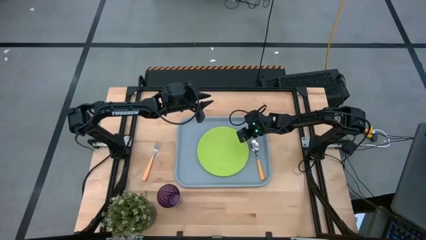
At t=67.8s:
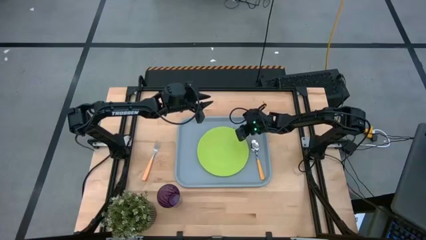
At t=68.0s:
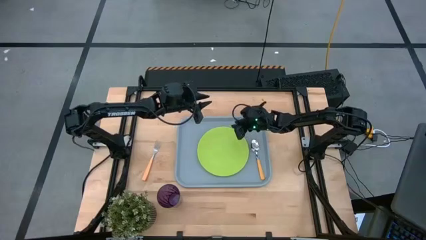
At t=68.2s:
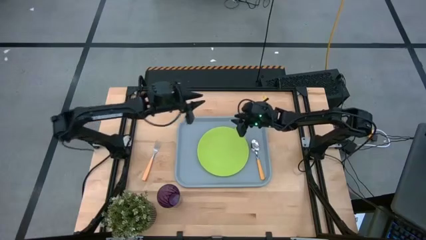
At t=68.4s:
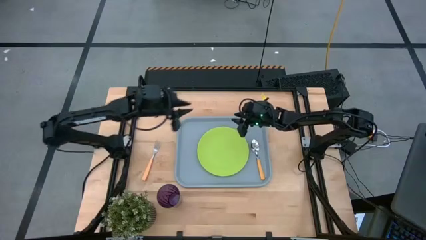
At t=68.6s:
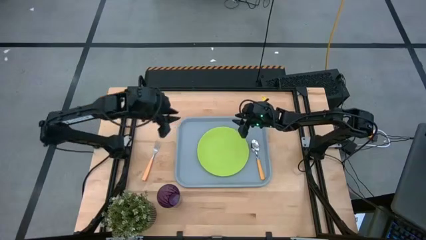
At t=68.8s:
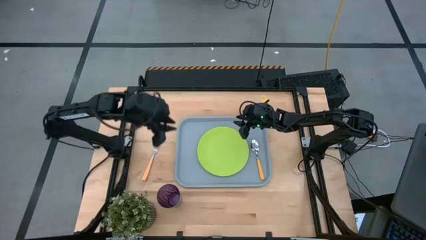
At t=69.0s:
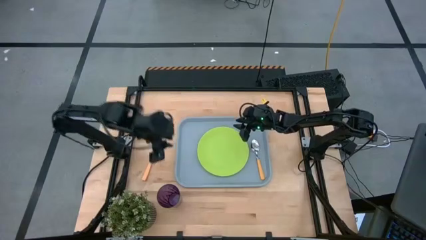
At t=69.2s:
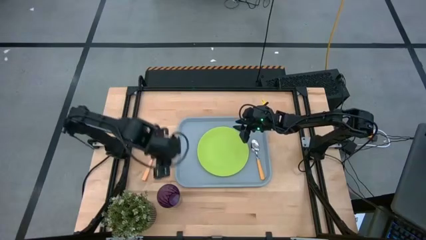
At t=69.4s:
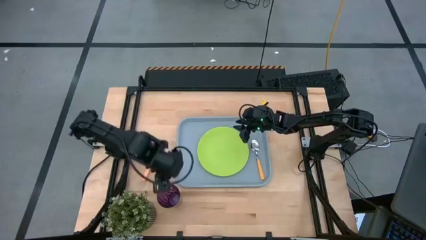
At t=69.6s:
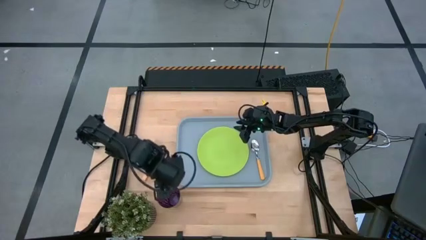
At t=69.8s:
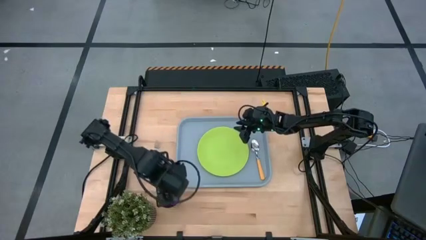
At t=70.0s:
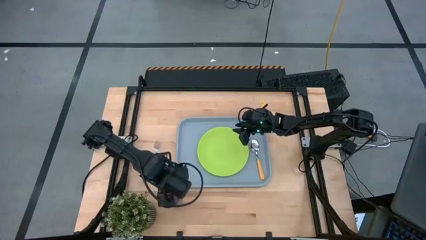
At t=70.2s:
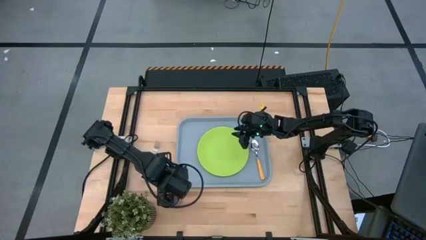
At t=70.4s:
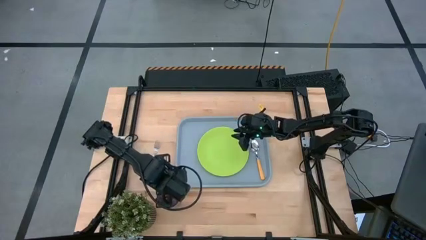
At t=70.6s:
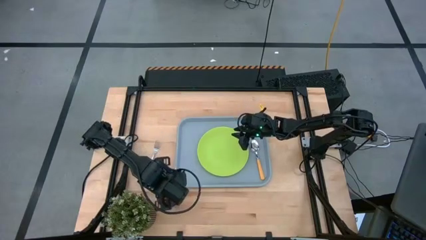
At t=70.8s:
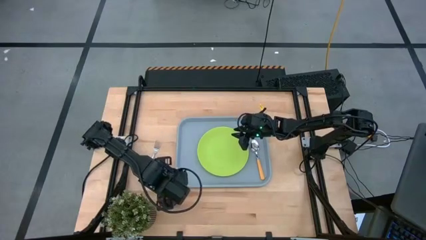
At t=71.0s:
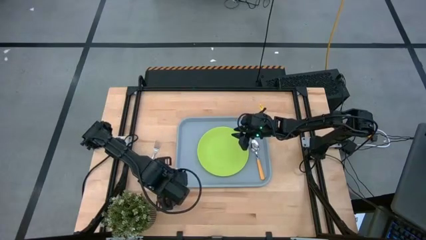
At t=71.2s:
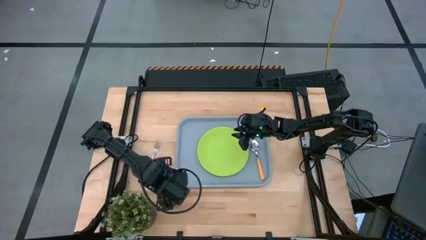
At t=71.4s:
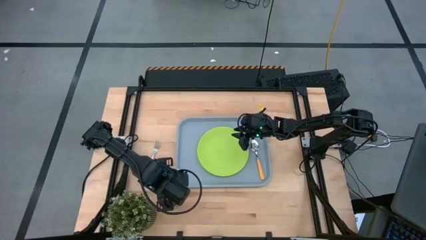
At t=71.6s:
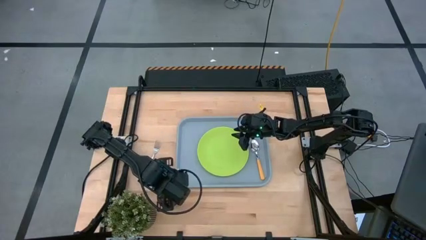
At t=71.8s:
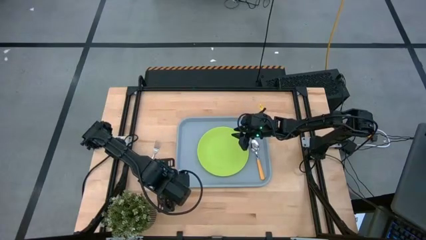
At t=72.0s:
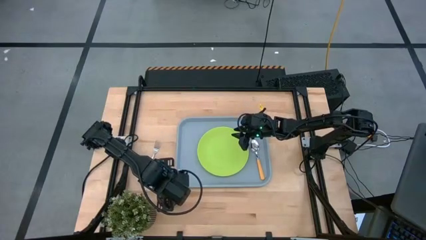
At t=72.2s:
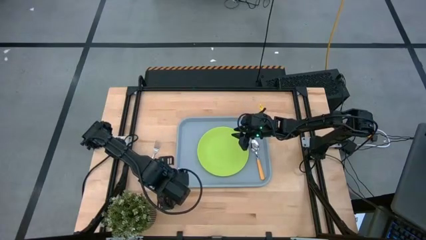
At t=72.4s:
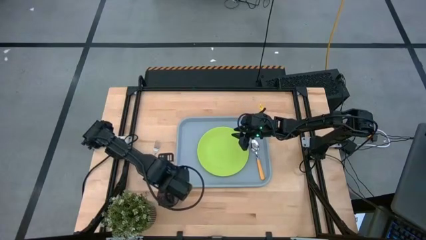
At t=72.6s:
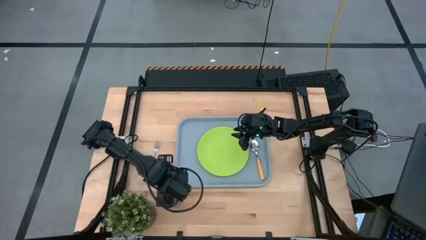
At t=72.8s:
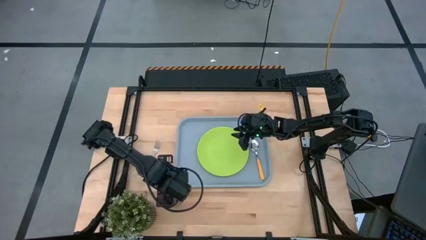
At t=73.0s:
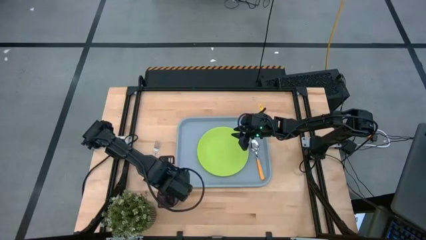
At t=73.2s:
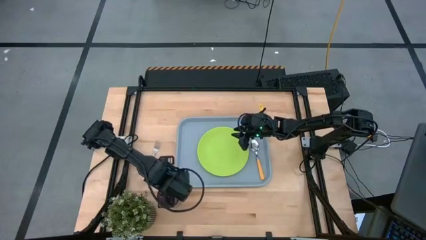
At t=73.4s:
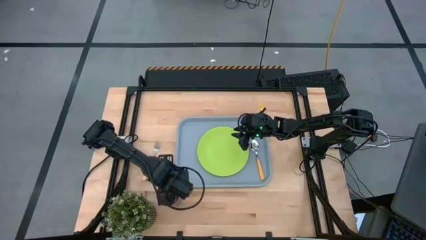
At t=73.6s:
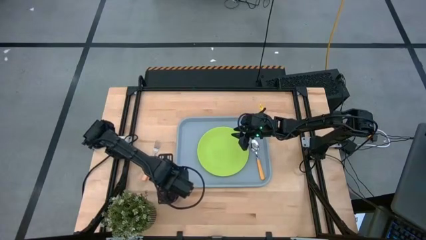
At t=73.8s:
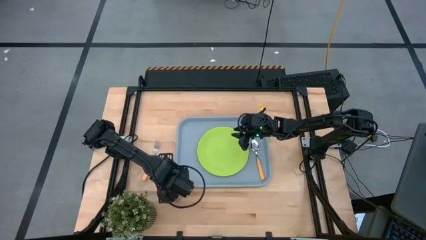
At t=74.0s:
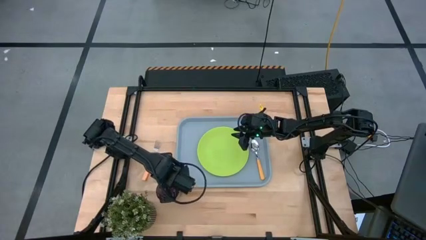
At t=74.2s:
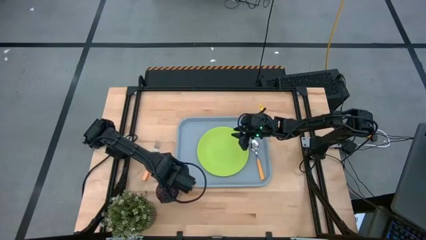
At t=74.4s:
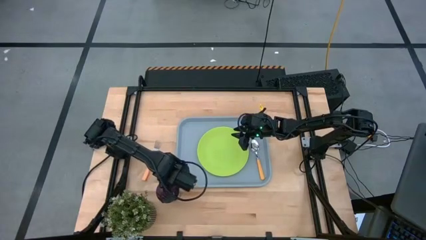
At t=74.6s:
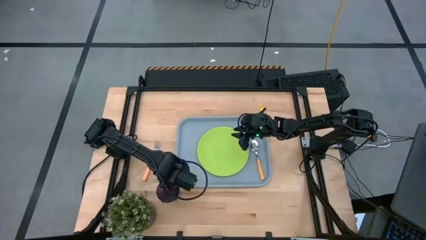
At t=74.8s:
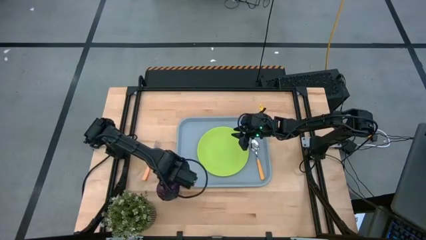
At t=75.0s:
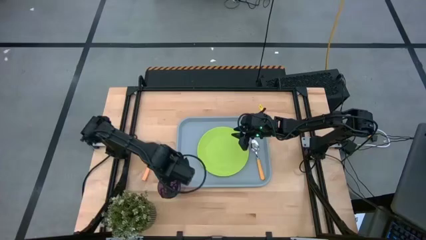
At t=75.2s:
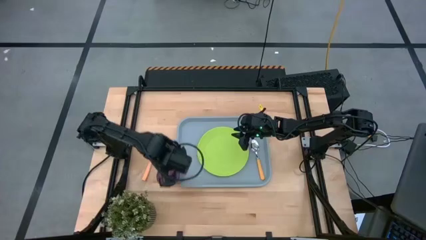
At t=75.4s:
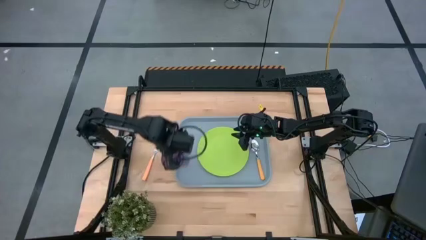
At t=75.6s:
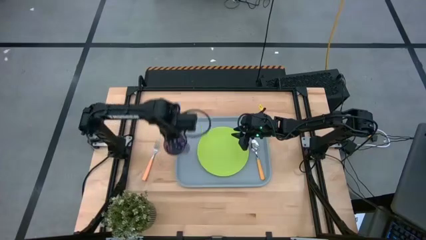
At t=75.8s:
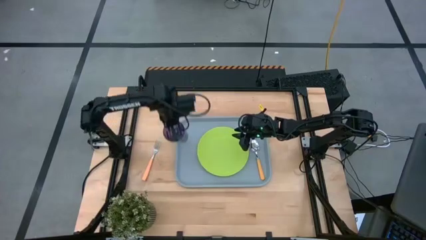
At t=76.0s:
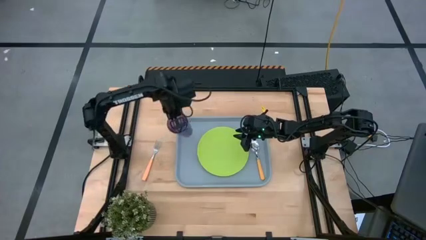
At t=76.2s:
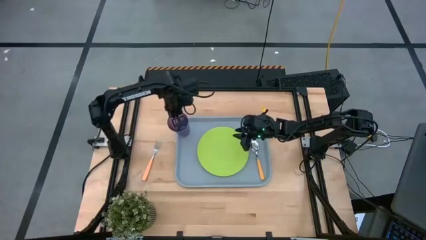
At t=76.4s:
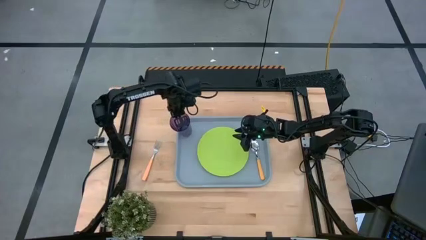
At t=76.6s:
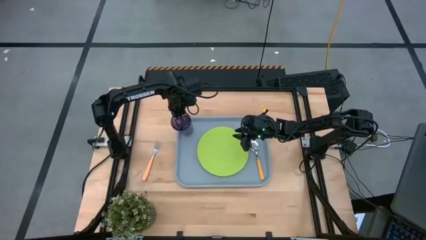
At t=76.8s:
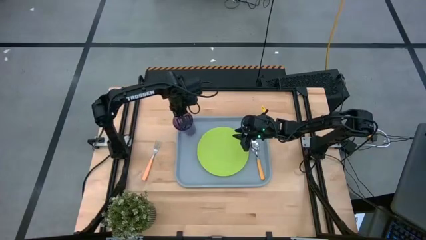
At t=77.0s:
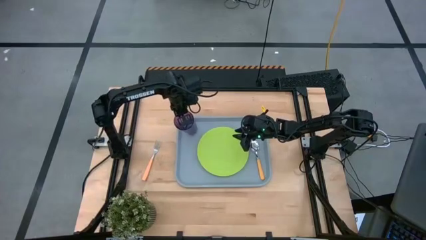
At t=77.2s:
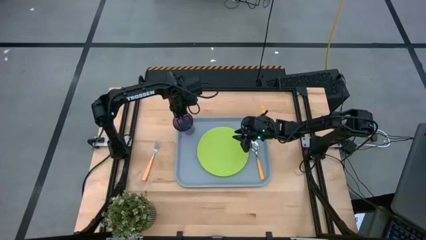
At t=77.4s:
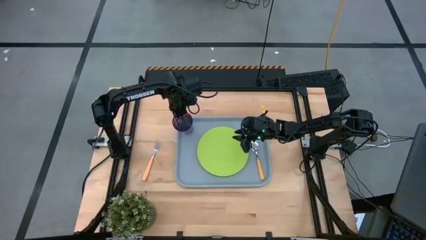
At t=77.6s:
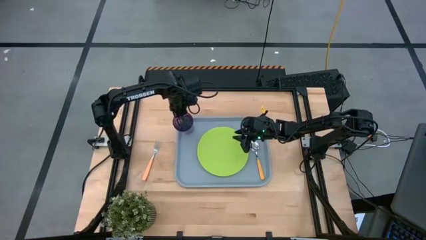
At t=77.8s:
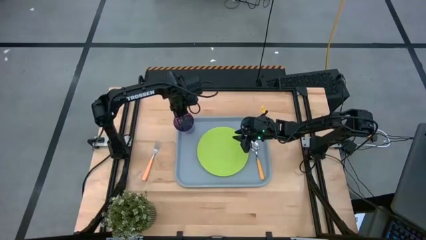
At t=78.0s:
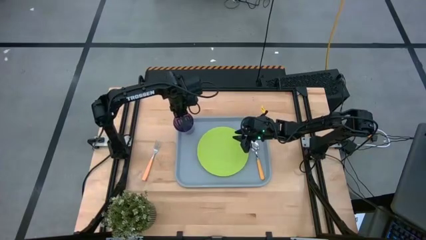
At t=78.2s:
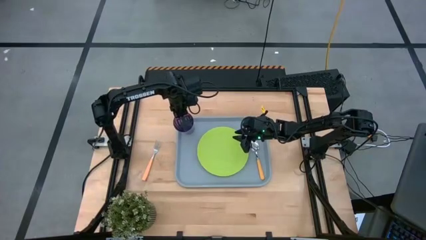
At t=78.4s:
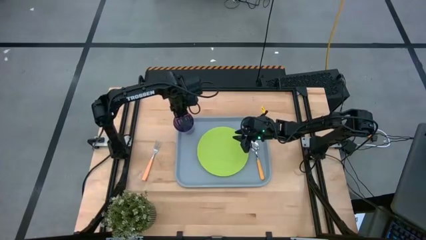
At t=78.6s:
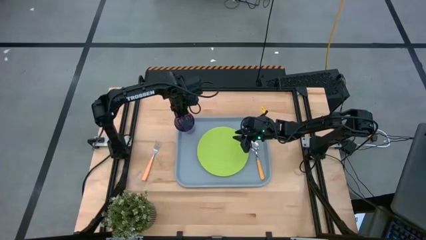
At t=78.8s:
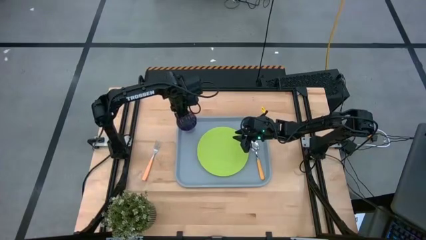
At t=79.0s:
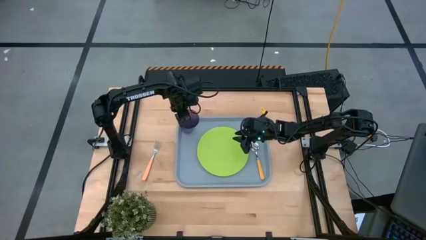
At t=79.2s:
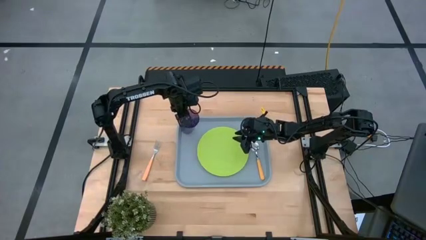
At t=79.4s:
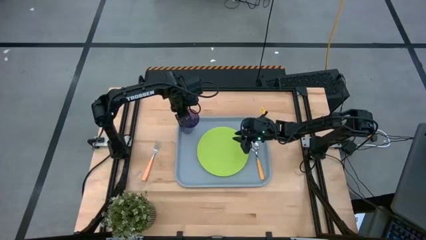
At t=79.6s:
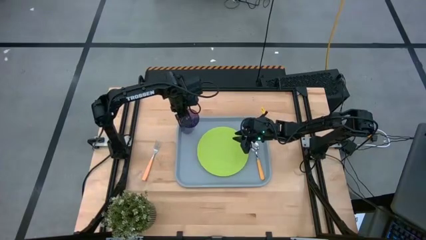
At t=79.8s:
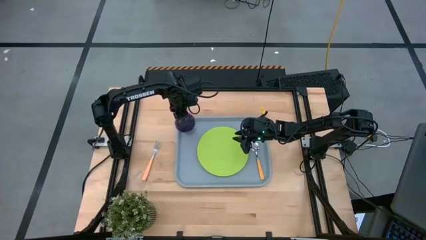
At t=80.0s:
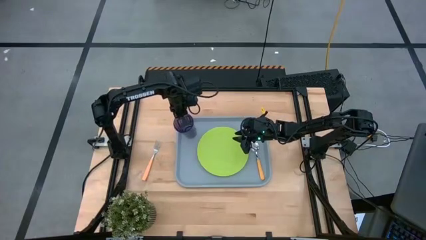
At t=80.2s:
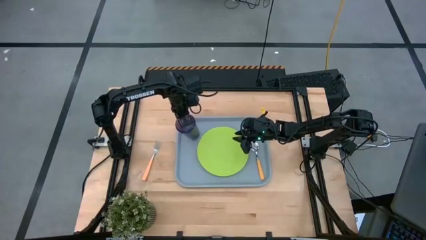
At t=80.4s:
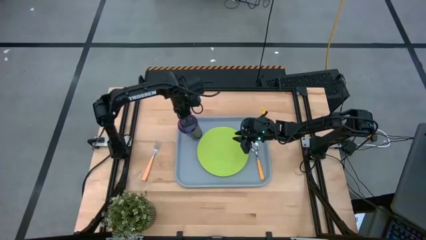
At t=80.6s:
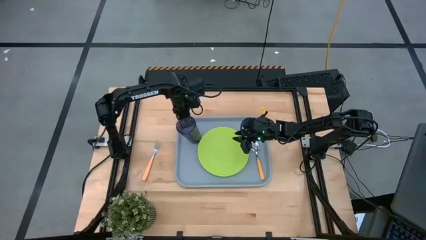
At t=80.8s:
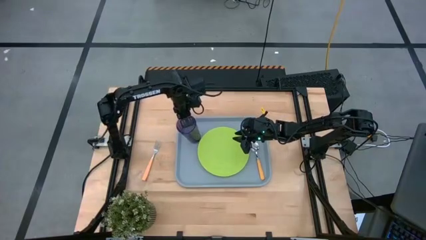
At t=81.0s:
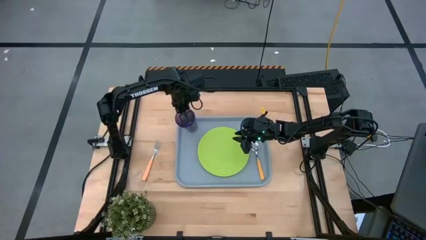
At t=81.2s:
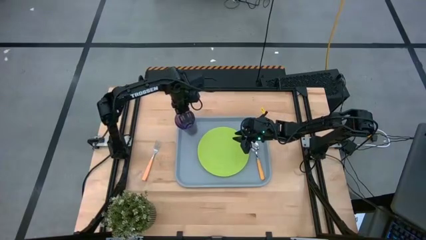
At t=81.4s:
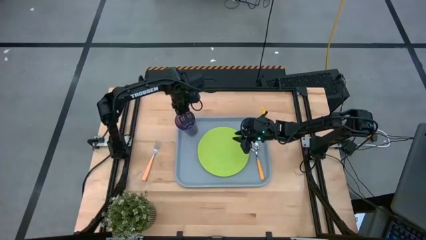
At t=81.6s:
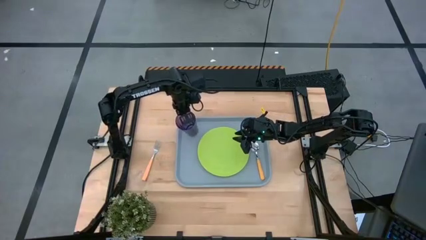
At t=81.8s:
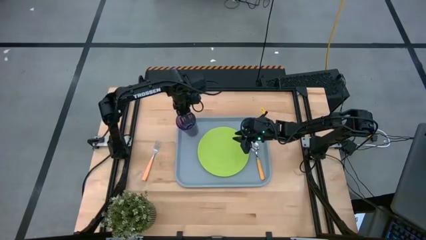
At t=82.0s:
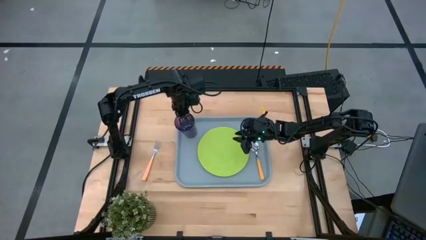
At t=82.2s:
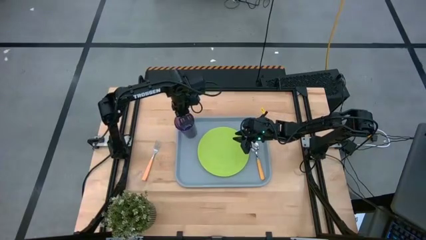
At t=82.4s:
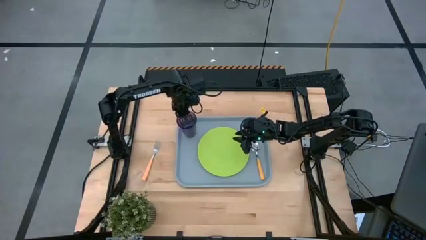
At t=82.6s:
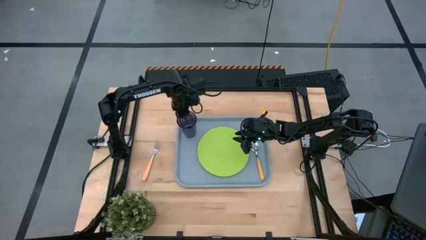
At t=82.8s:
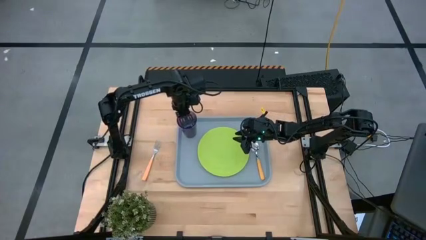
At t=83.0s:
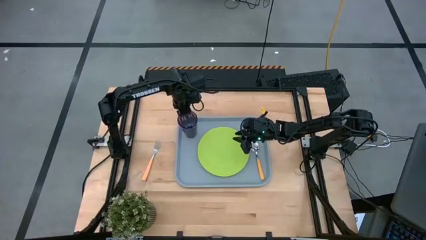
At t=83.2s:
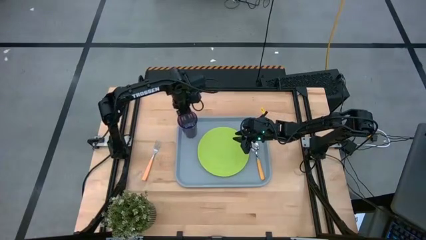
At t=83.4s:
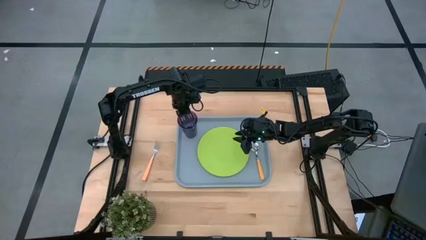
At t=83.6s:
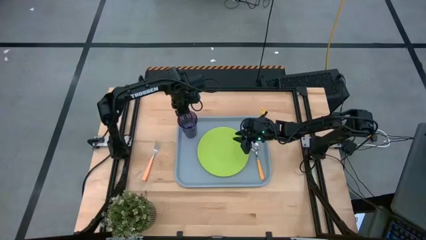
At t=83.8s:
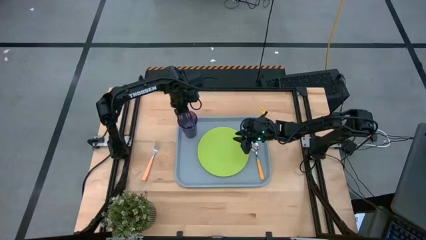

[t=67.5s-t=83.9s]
Task: Pick and place plate/cup/fork/spoon on tray
Put the purple cup on the gray serving tray to the top left of the green plate

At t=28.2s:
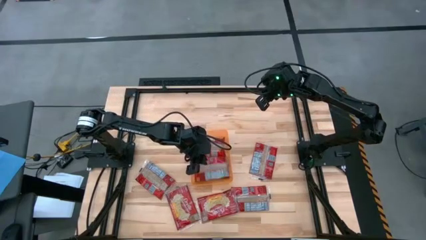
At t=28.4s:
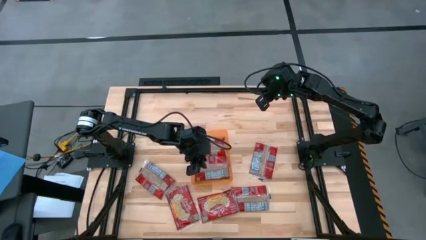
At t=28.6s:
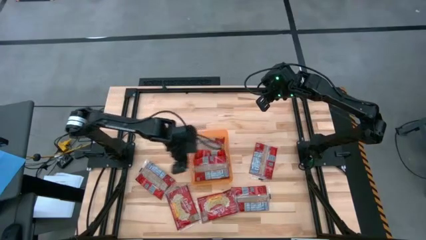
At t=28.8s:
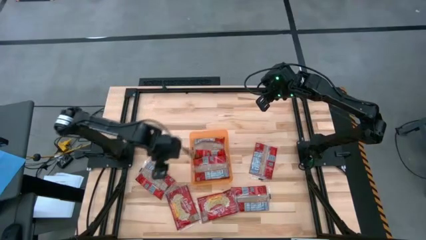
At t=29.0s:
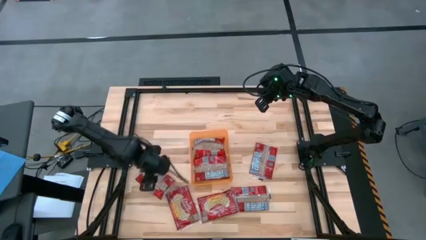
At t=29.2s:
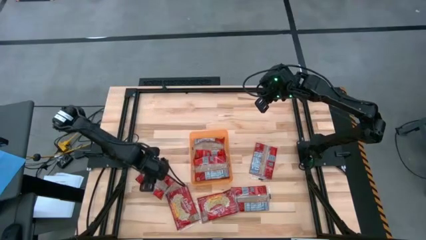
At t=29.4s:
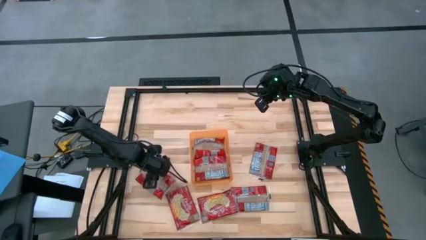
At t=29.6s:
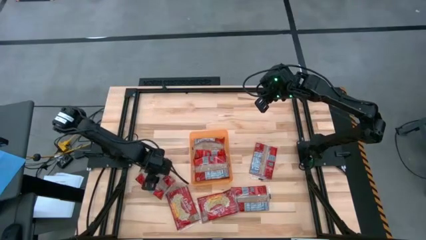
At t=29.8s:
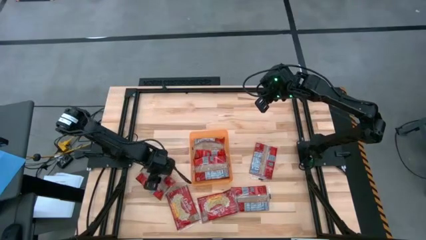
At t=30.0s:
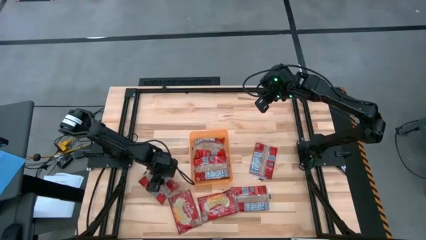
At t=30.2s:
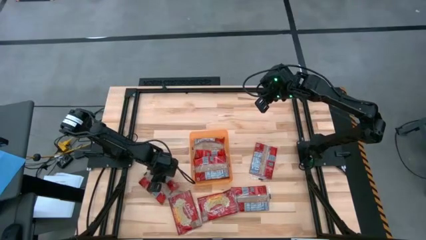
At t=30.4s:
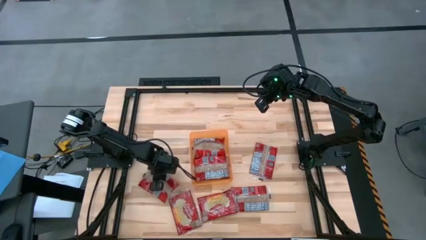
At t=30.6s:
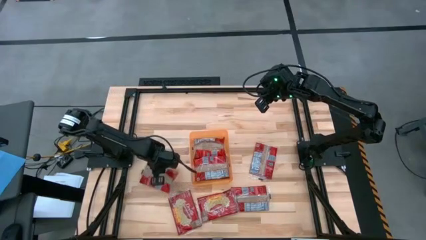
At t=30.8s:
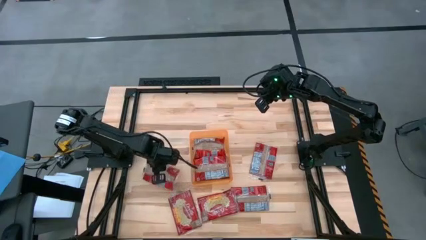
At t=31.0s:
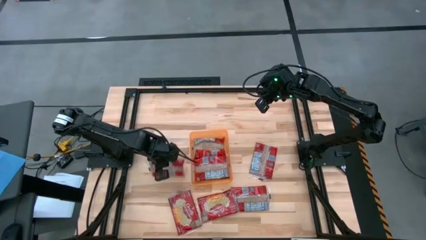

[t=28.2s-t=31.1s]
Task: Sort popcorn bags into baskets
Put the red popcorn bag into the orange bin
